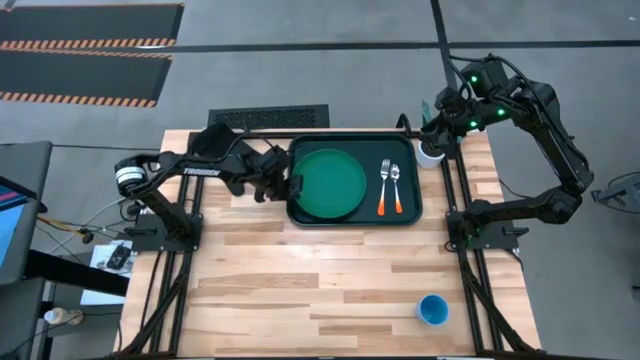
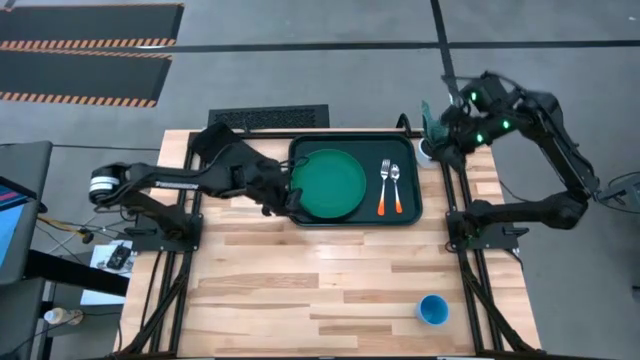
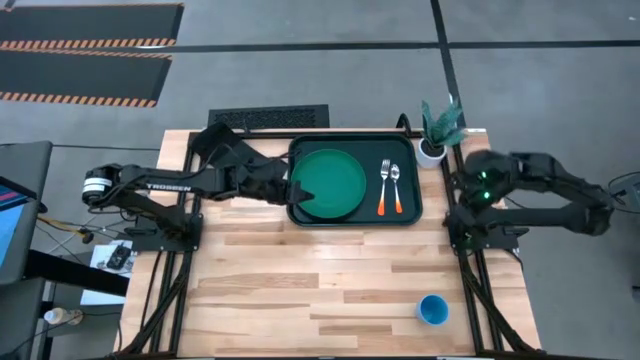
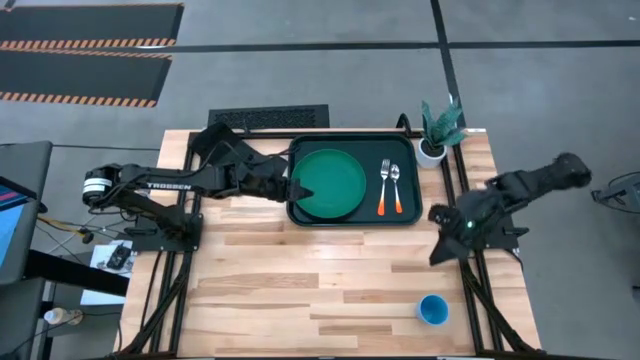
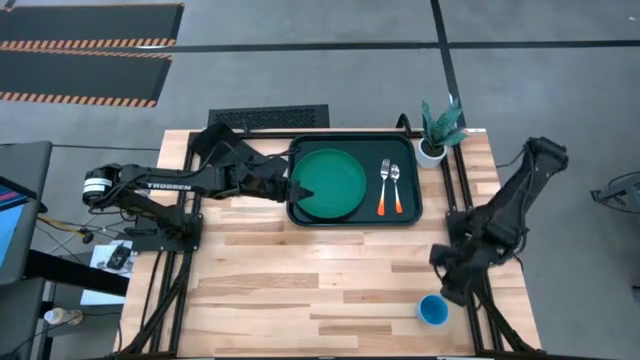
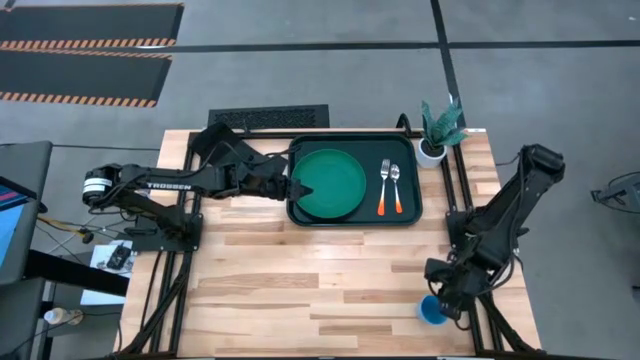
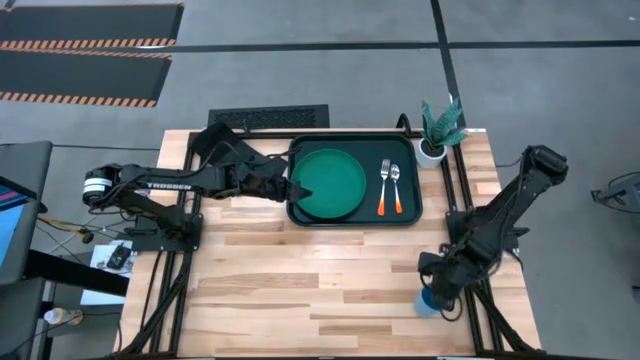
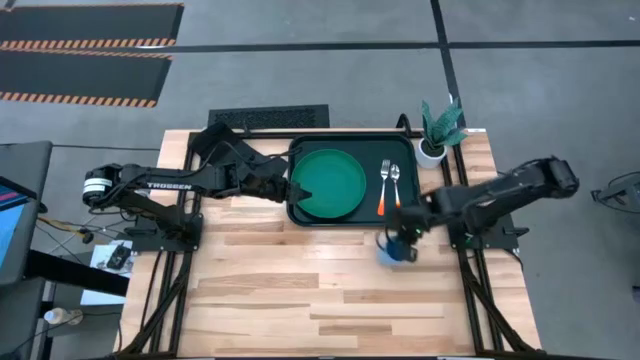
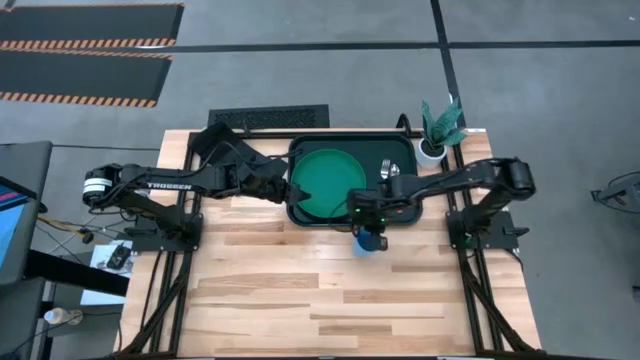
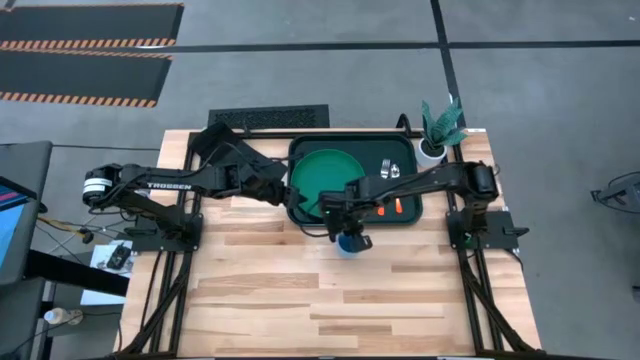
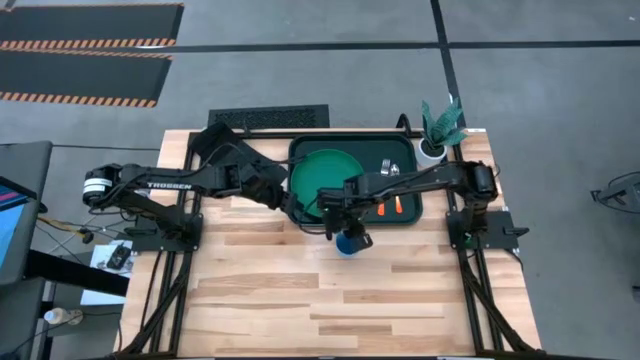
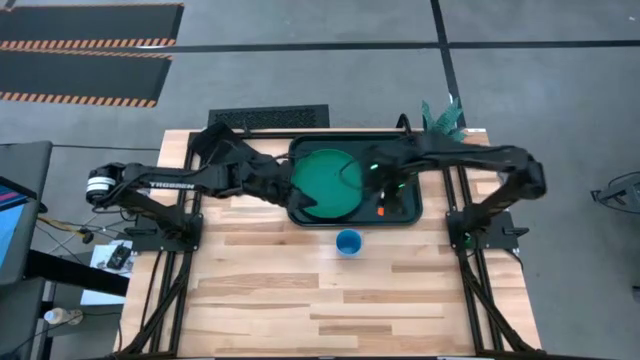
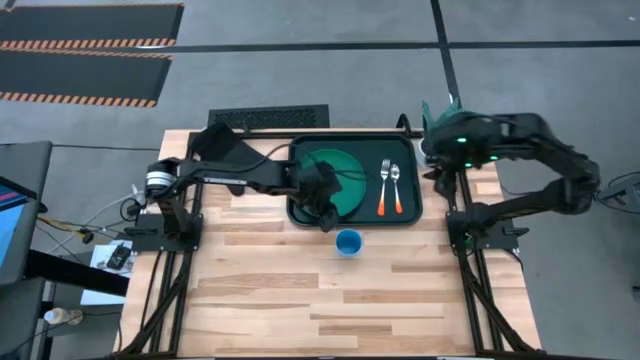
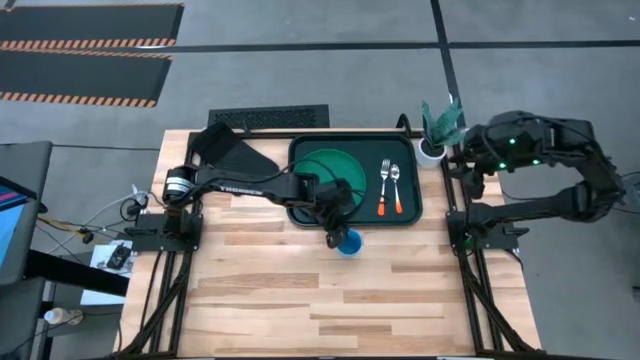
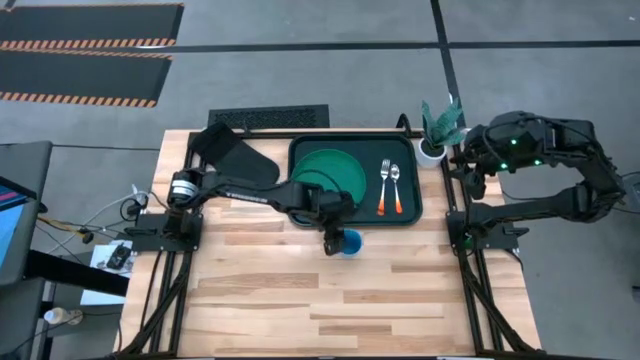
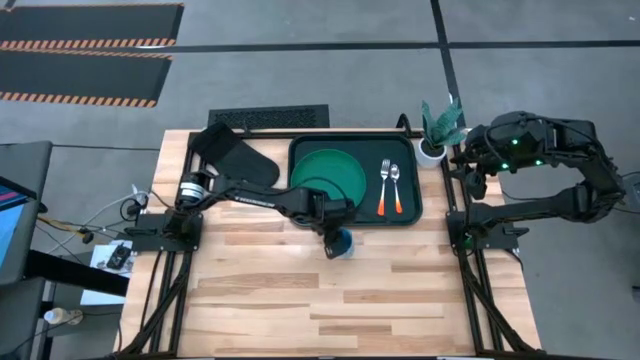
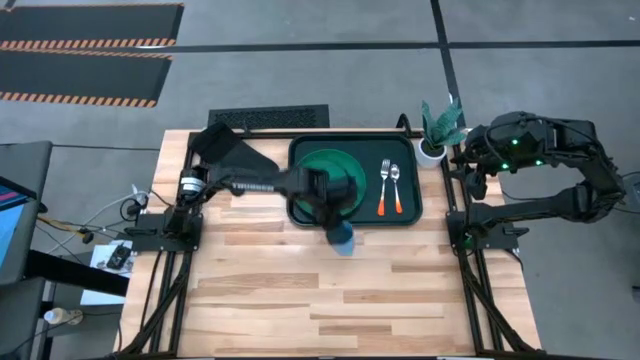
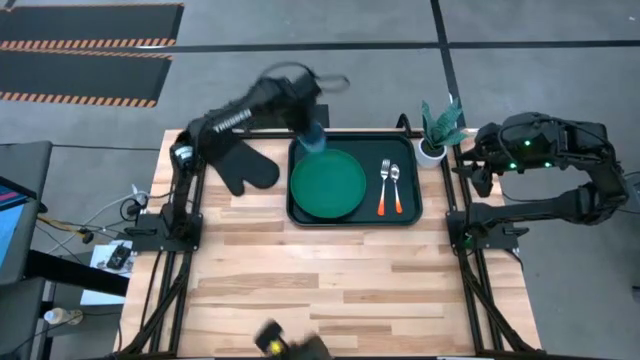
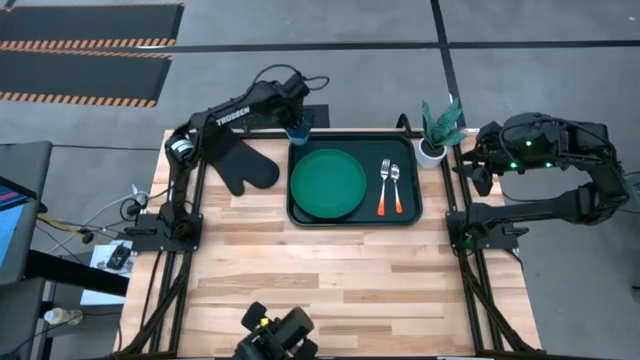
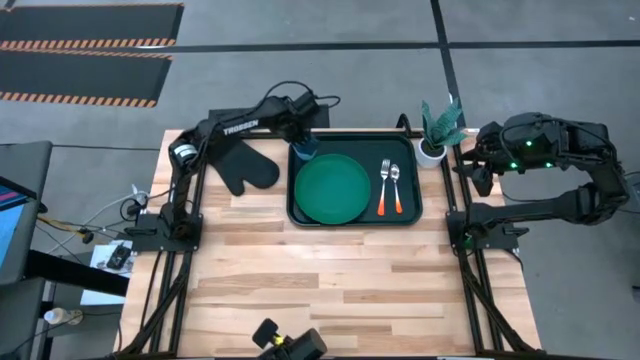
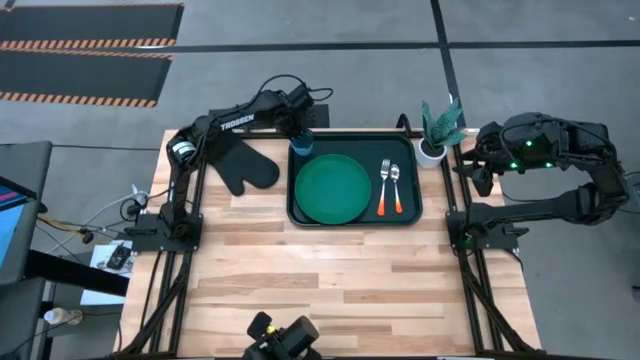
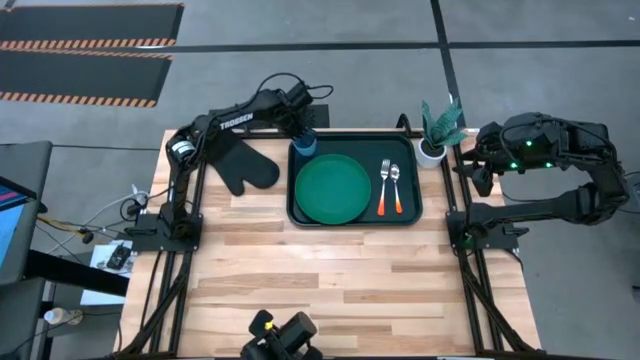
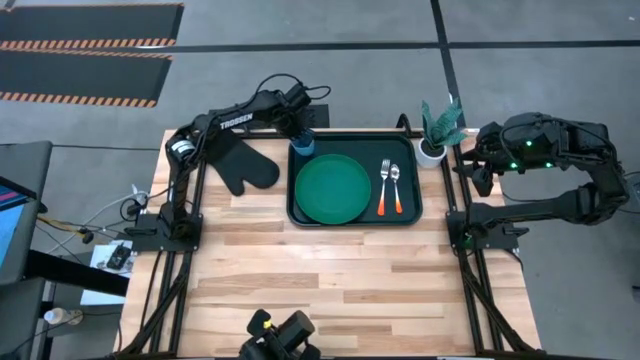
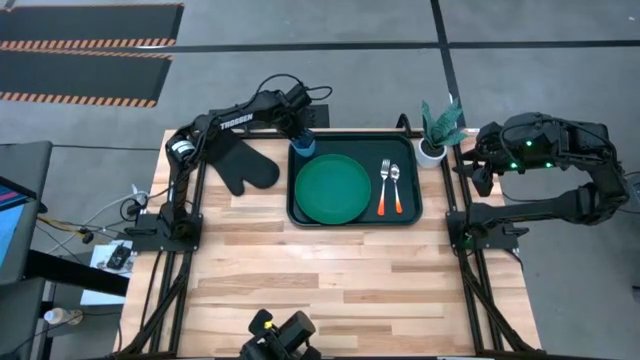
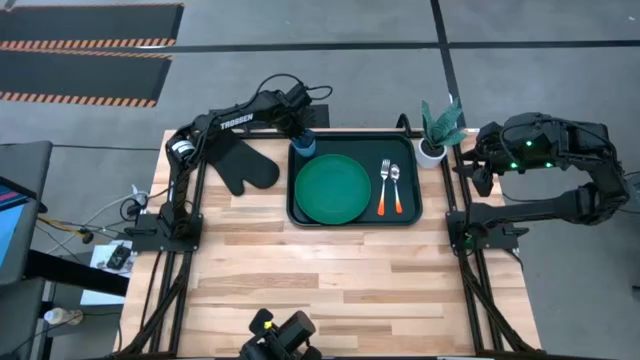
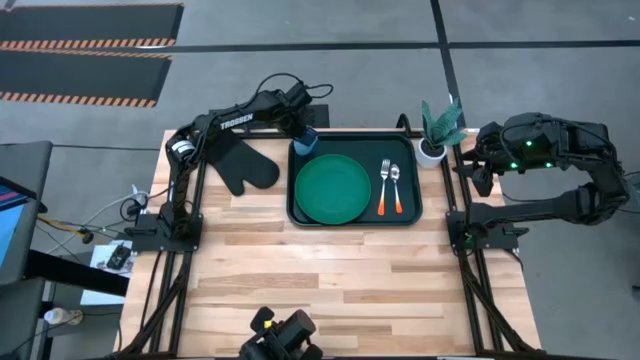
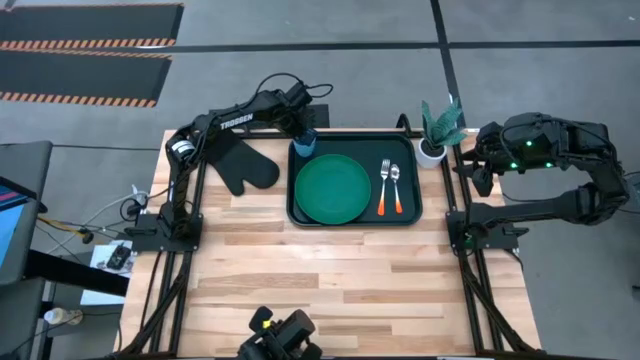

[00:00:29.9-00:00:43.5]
Task: Pick and place plate/cup/fork/spoon on tray
Put the blue cup on the black tray to the top left of the green plate

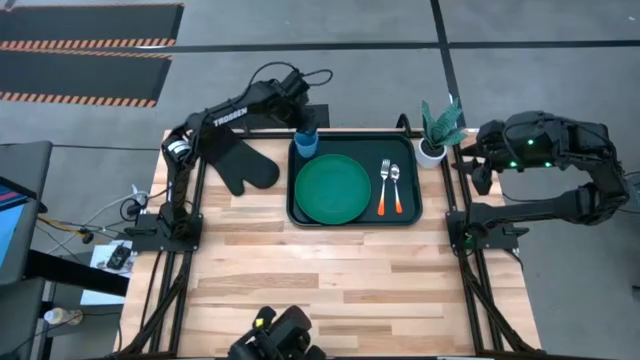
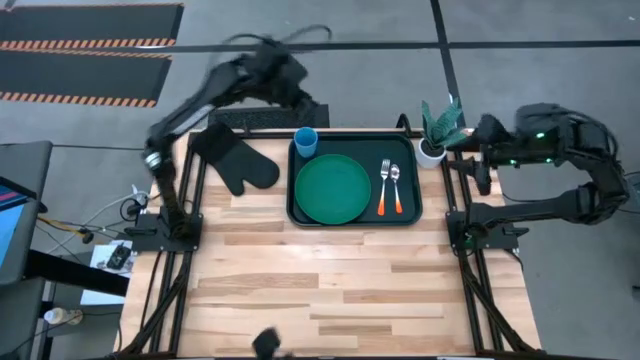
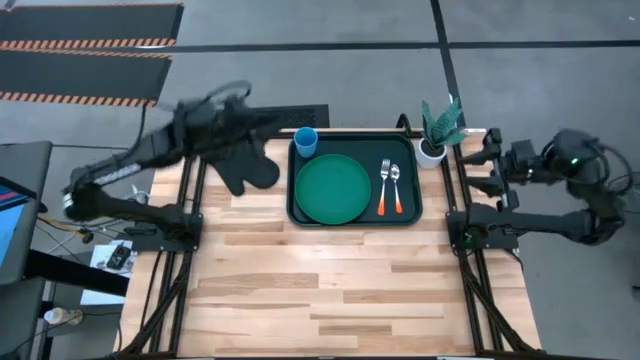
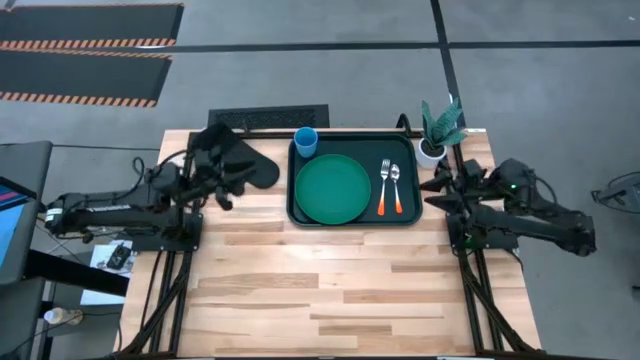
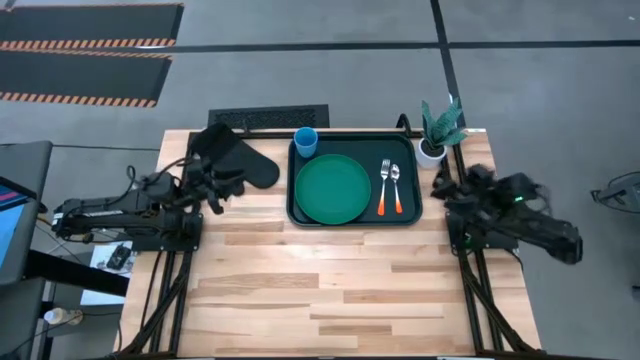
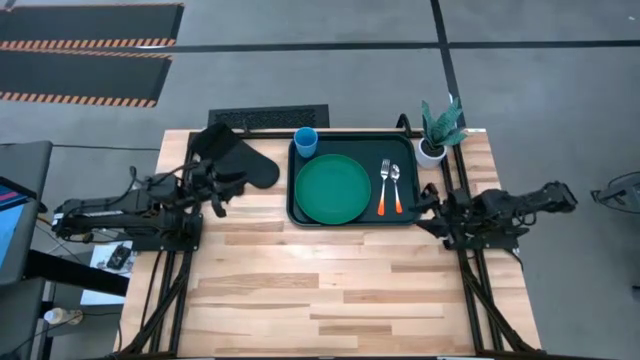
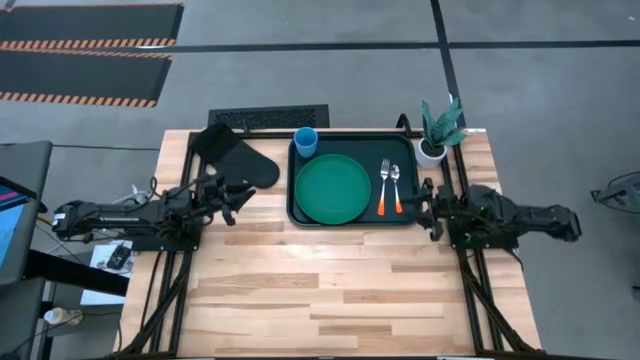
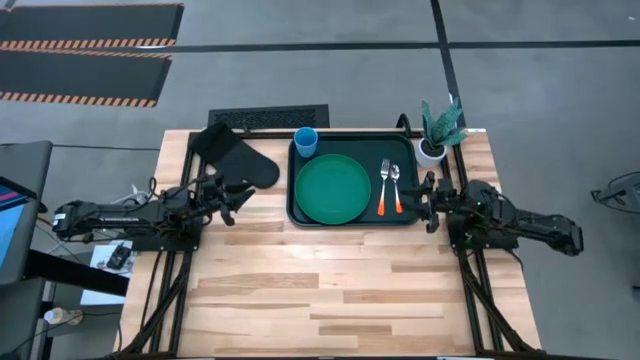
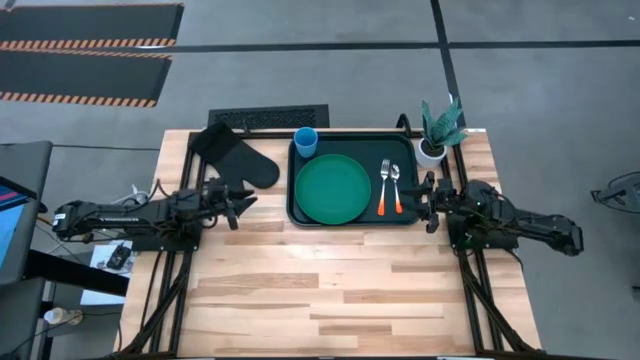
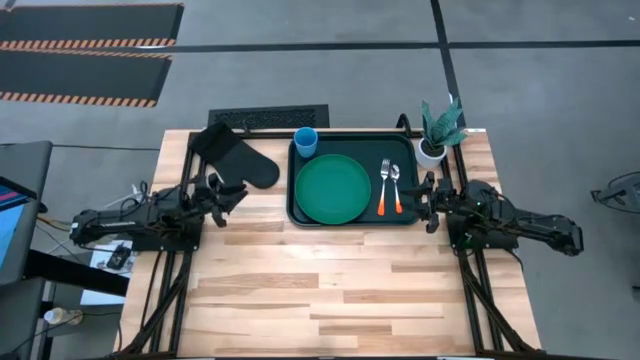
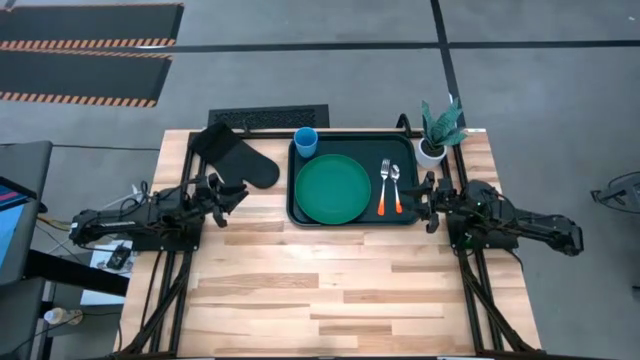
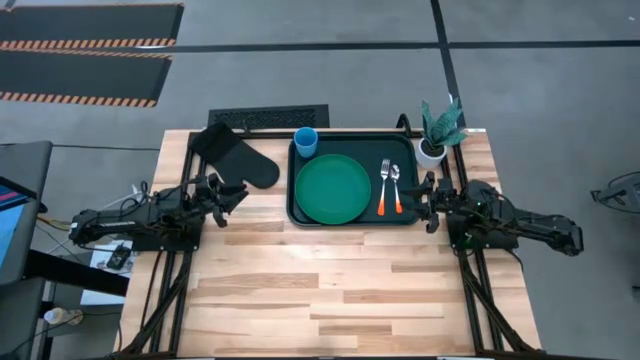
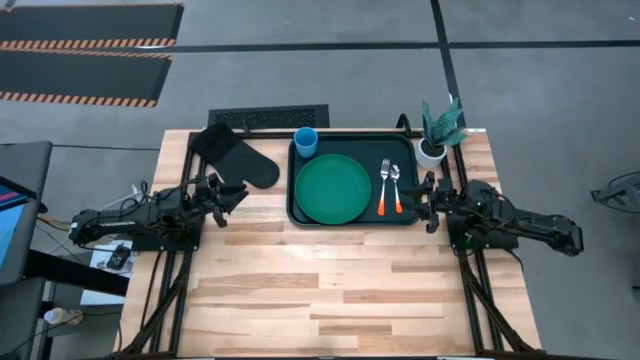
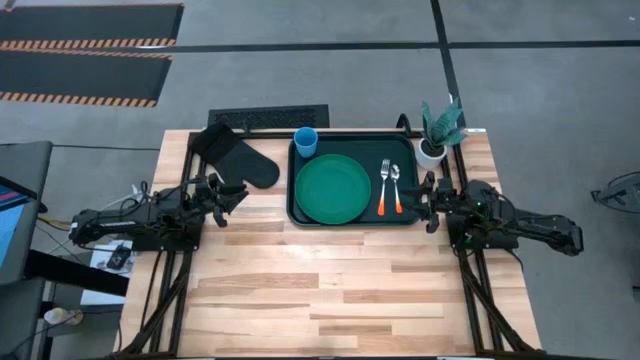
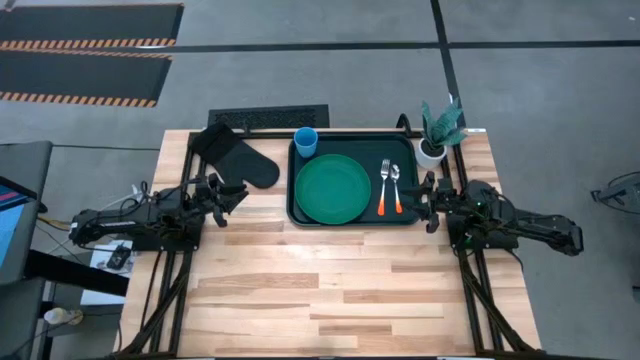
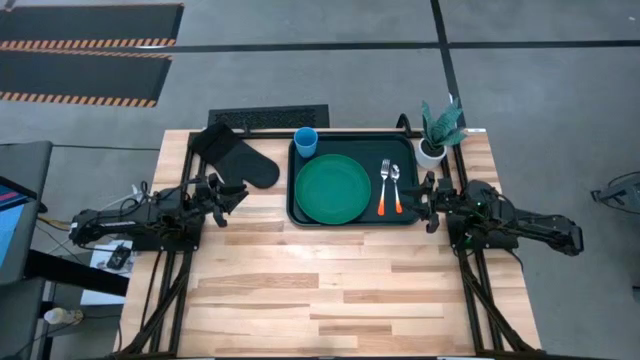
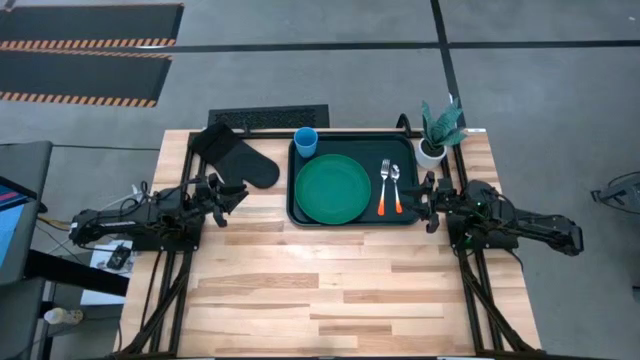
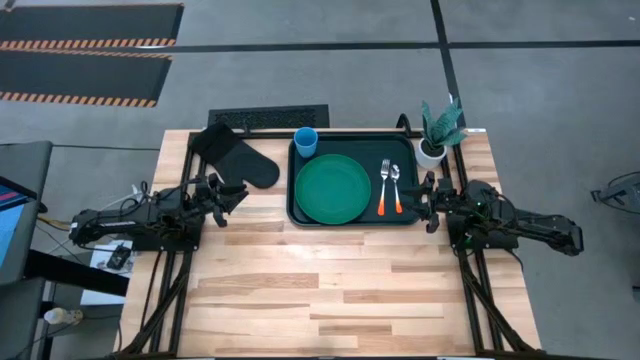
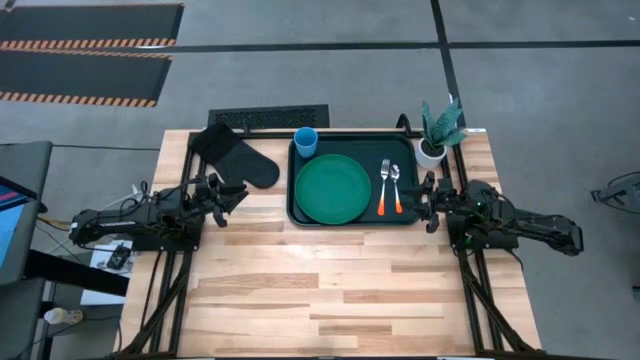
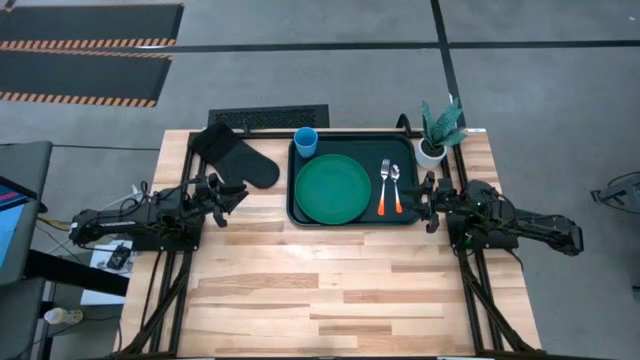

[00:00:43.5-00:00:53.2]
Return to Home Position
